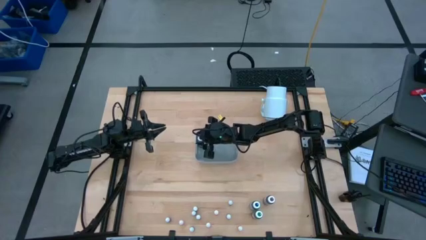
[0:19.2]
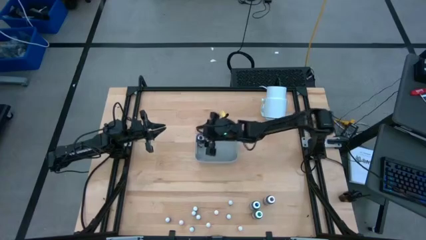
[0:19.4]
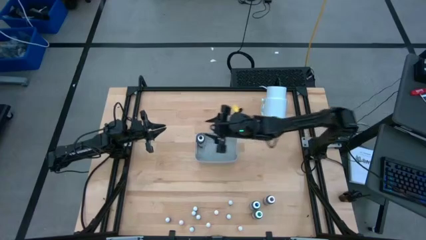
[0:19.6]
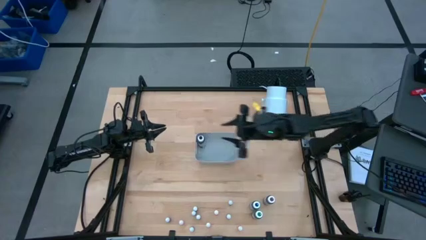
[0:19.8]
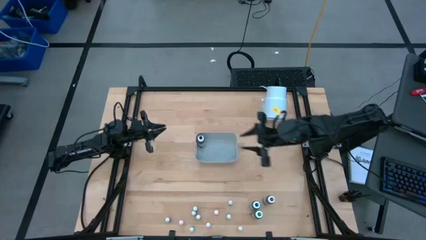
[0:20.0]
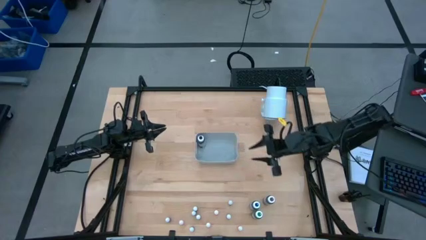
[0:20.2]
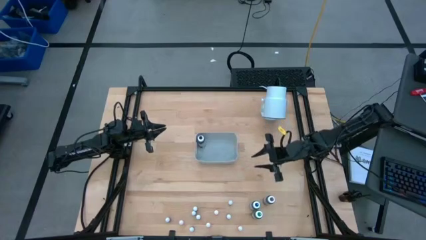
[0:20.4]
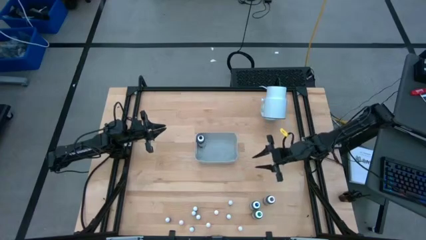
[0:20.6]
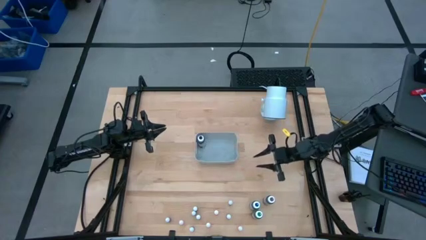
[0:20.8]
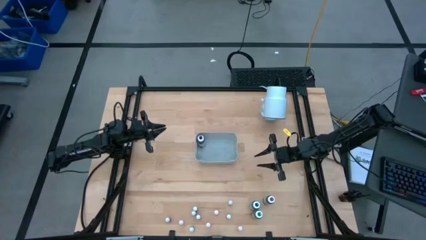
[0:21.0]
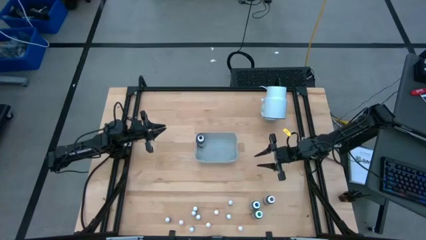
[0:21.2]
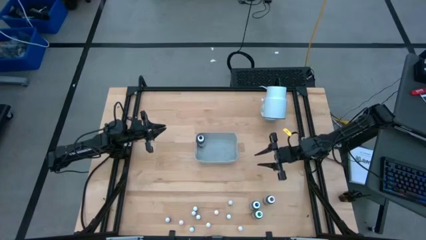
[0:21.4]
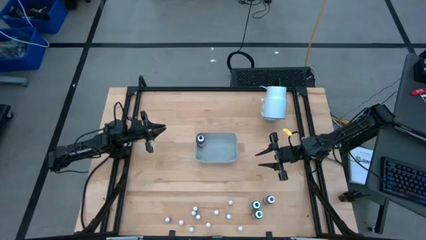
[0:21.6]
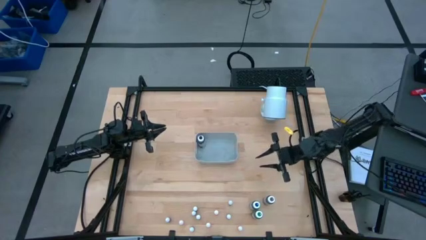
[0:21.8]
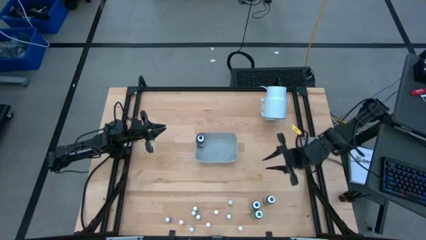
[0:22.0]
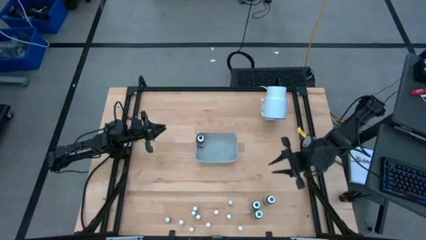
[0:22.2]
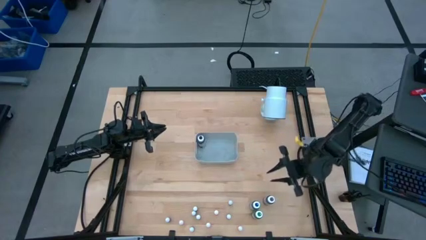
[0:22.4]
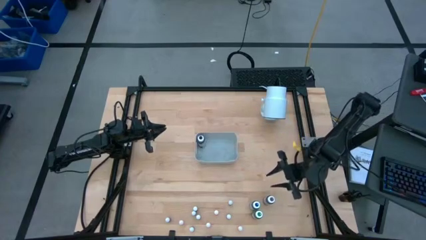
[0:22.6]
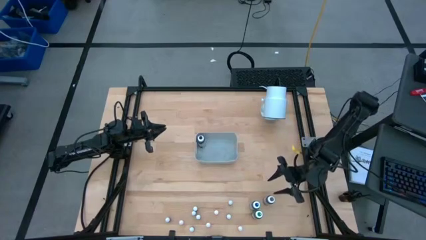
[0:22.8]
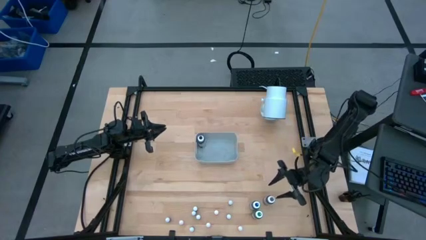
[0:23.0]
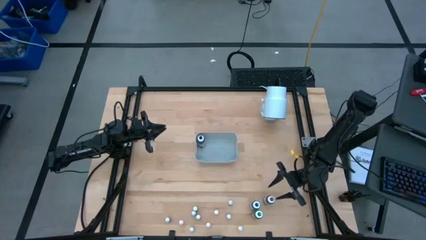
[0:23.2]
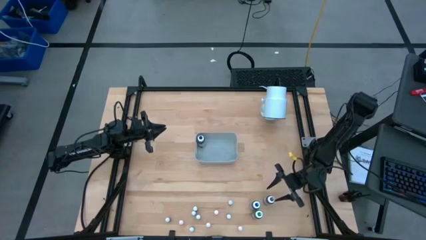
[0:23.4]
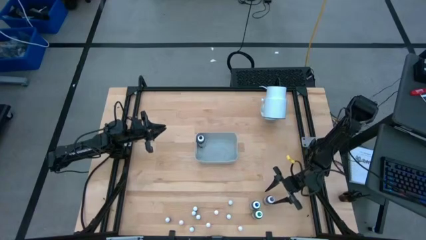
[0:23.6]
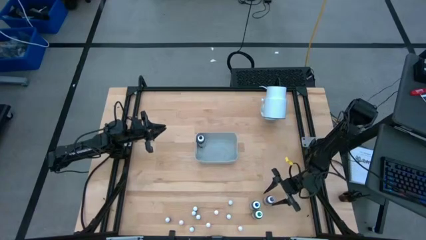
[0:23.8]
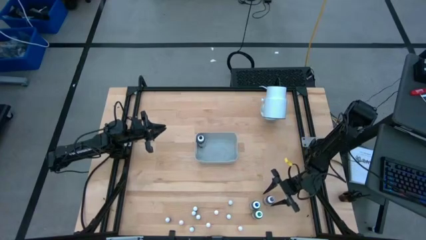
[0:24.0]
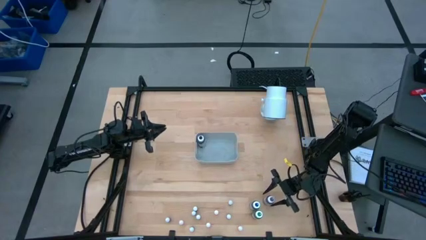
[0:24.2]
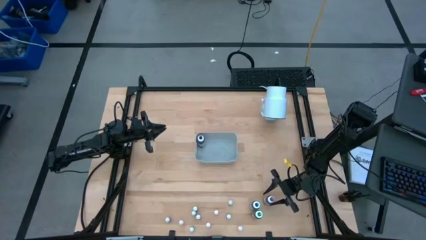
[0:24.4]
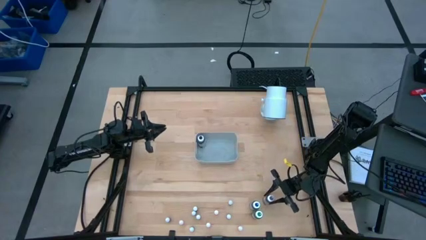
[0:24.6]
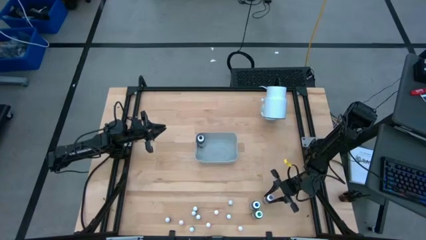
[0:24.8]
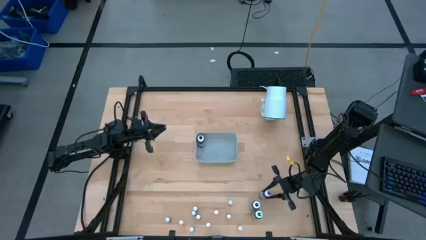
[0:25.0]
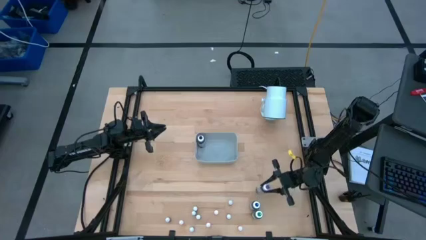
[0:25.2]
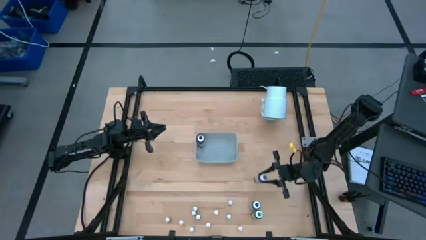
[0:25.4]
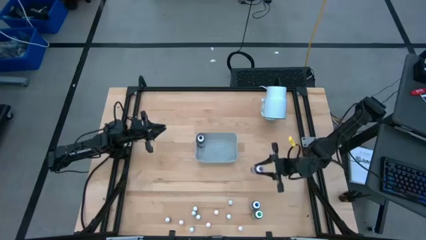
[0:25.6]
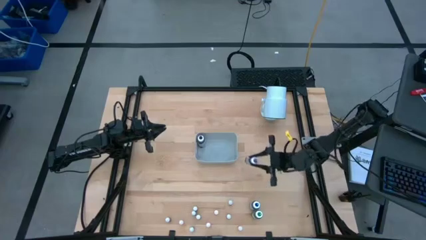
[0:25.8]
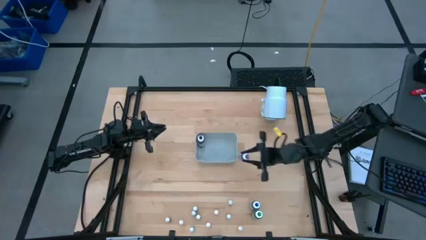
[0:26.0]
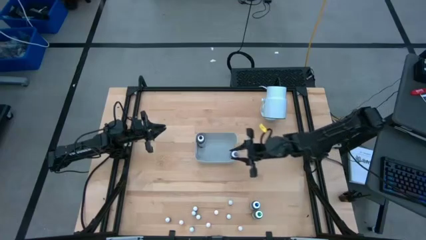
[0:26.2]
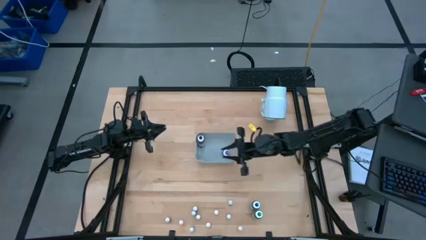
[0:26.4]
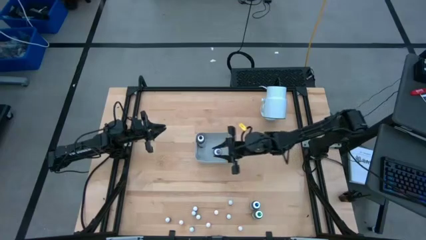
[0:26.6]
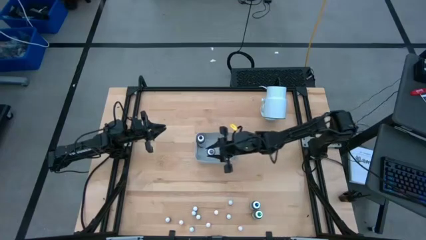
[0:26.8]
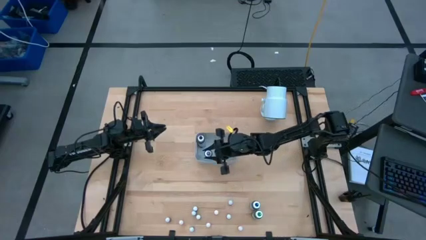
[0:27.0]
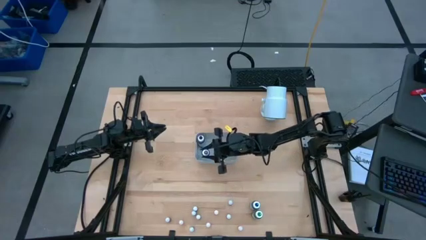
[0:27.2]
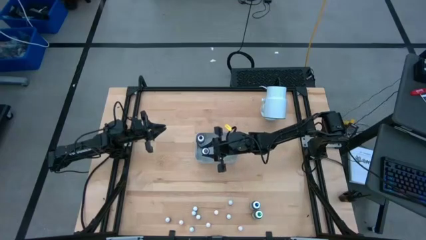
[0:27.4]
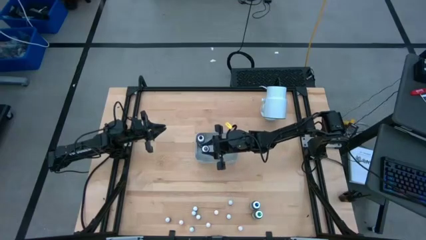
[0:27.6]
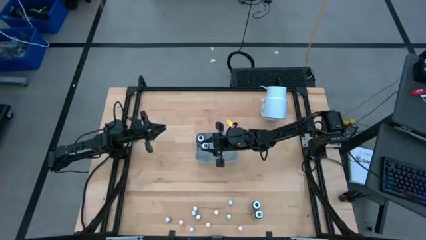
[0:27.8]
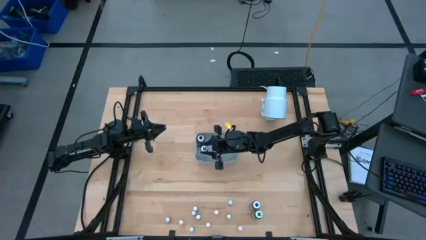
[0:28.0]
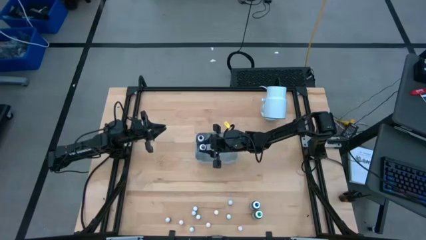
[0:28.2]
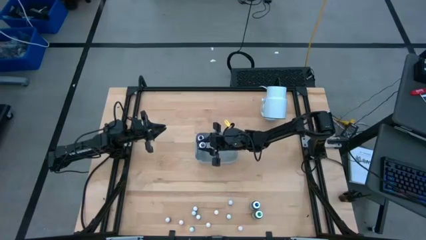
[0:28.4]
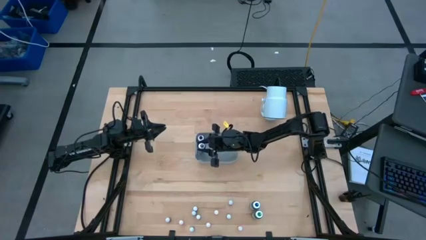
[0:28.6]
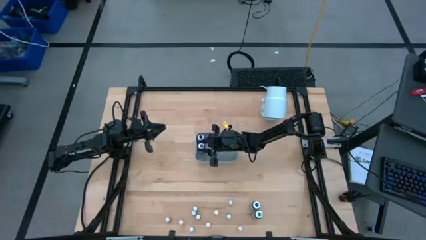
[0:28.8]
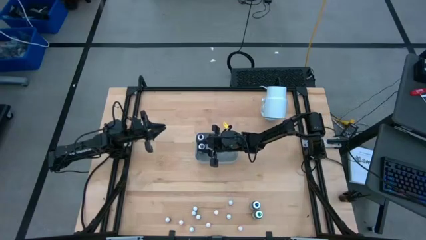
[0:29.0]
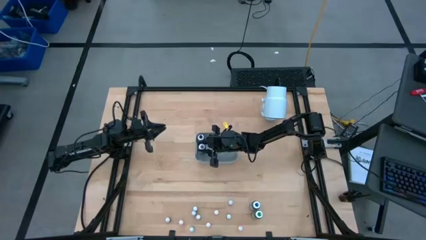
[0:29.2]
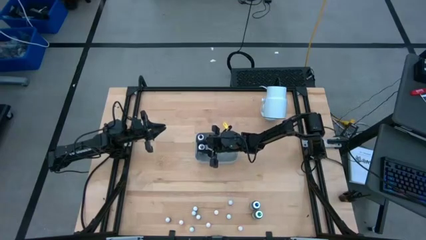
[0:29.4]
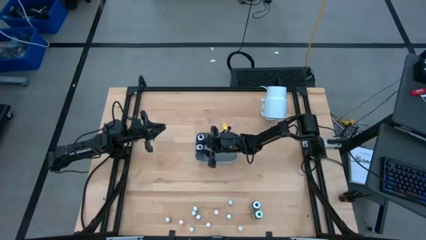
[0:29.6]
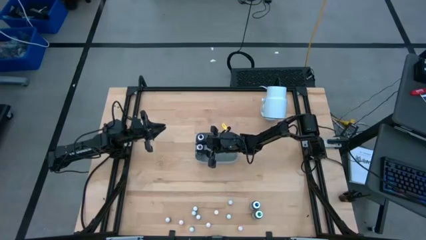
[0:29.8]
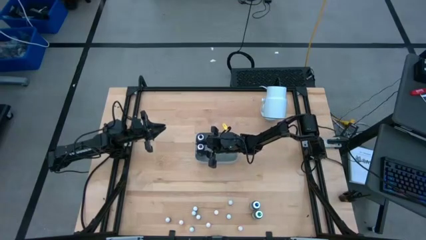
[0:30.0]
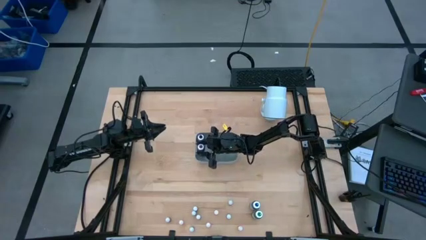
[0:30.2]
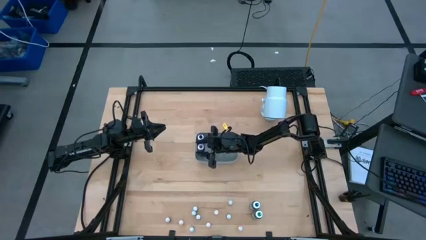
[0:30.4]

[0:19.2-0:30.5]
Task: Pick & Place food coloring
Put the large purple food coloring bottle into the white bin

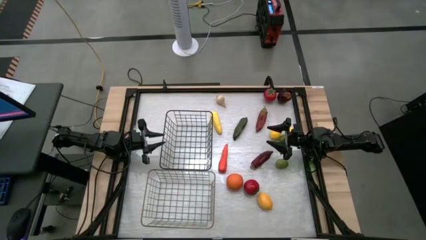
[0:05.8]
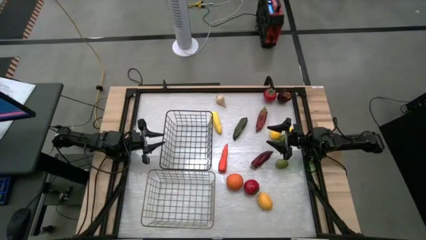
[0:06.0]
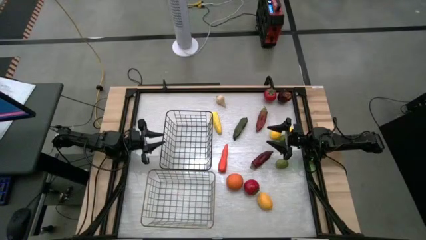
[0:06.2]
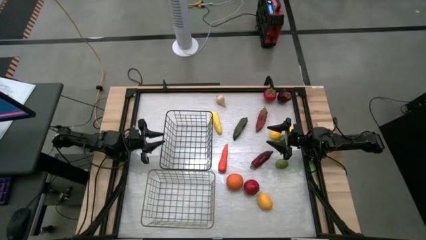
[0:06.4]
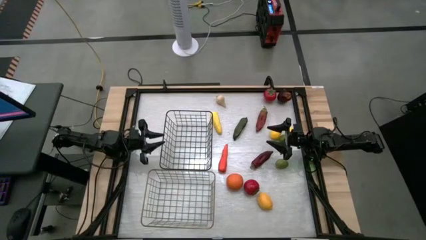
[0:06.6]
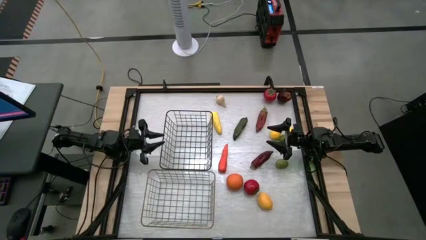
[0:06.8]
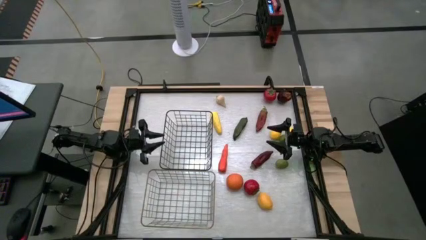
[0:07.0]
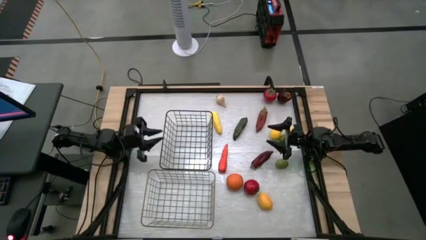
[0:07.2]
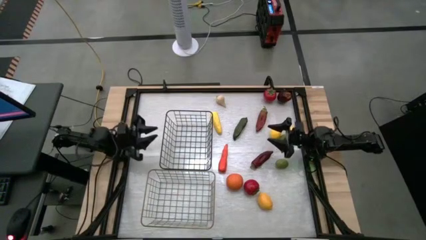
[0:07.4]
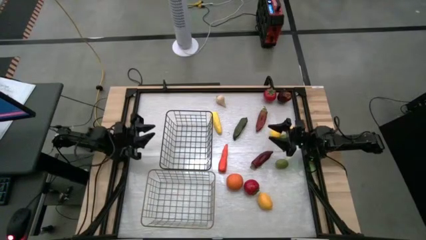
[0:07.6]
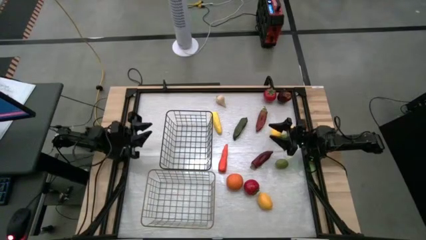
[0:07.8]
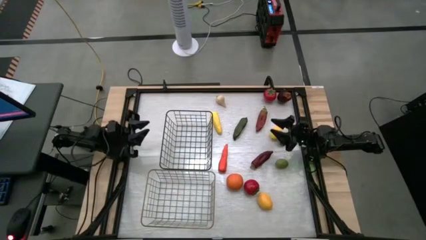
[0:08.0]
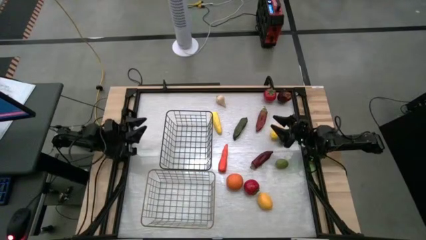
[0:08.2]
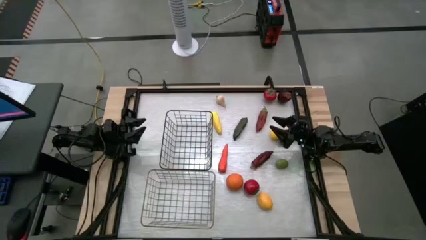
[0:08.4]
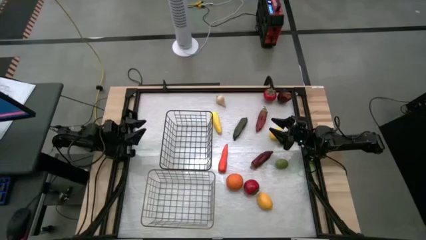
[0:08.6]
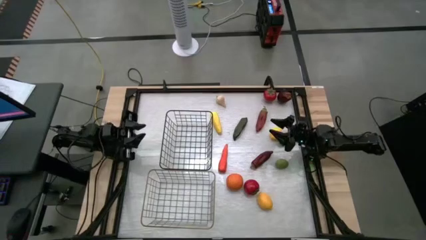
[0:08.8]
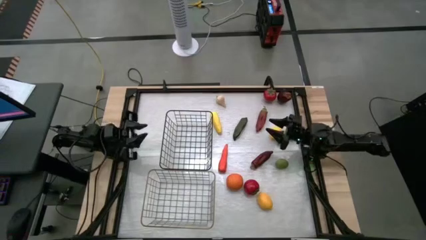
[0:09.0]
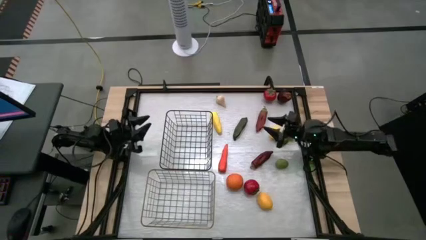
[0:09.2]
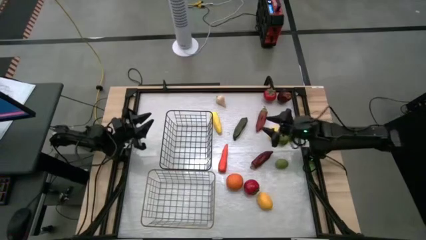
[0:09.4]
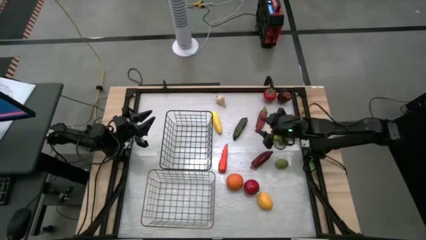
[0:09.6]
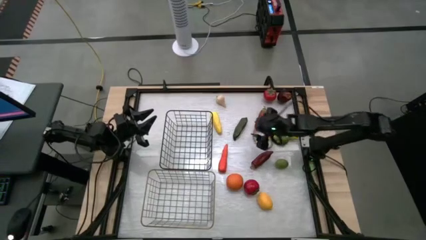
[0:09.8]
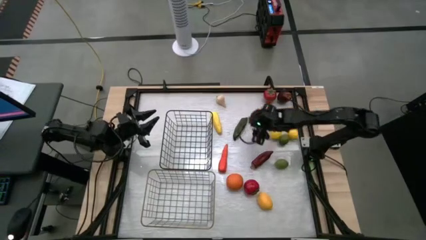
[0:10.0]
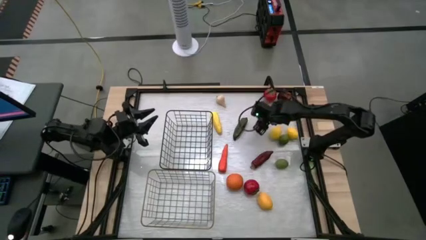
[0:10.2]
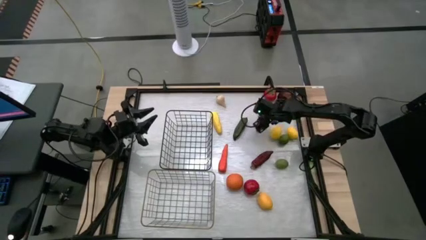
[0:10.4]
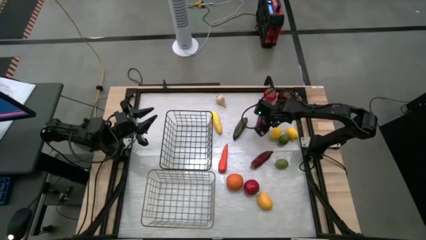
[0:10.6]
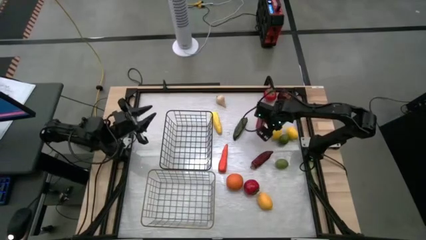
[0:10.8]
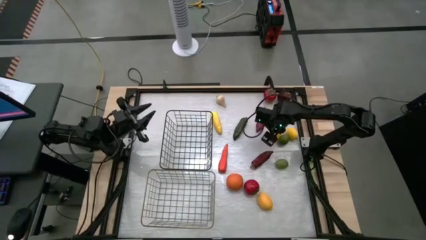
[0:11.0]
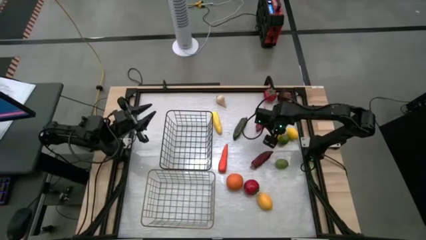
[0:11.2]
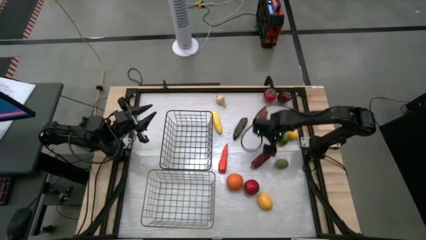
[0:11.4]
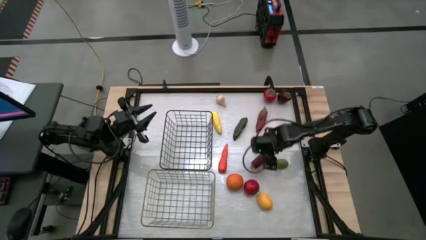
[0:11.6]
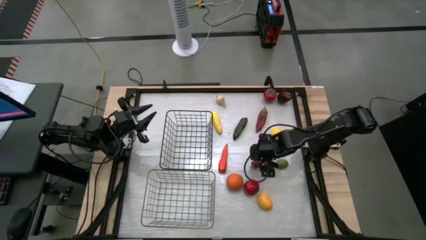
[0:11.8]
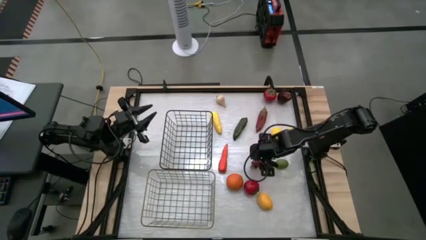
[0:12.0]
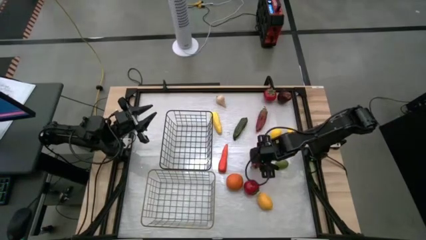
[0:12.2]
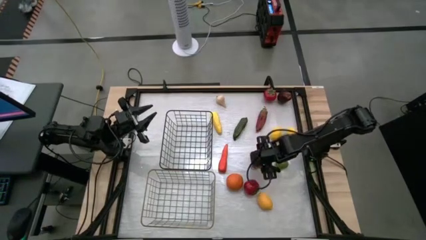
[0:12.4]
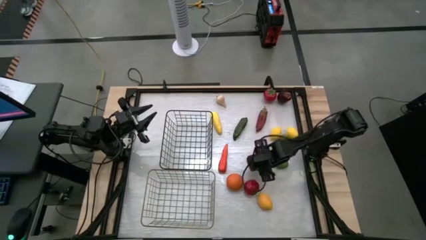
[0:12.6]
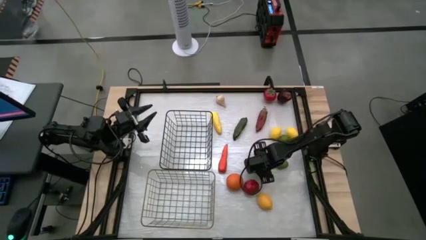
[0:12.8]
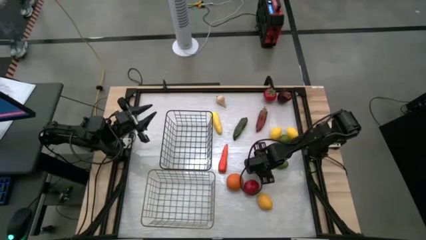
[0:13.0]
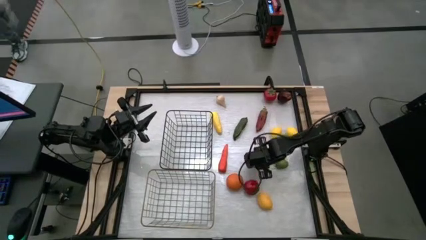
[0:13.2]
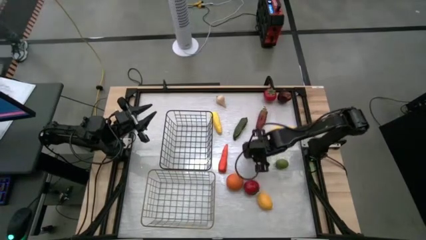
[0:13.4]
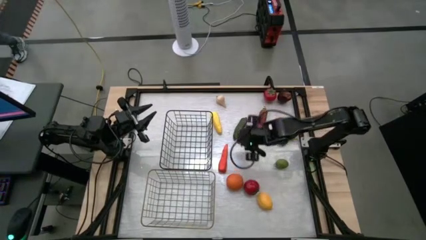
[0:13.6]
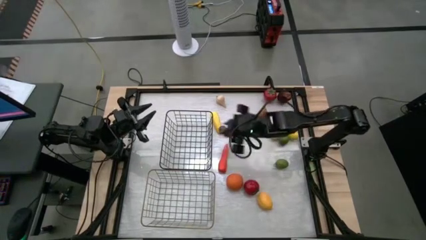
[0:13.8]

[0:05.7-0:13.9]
Task: Sort produce into baskets
Put the bottom red pepper into the black wire basket
